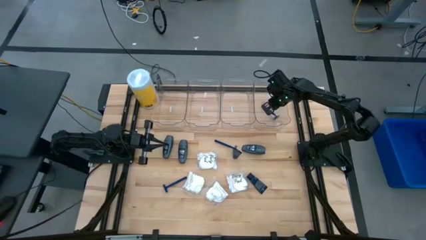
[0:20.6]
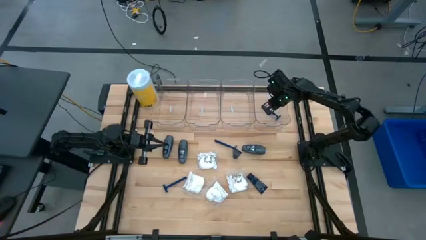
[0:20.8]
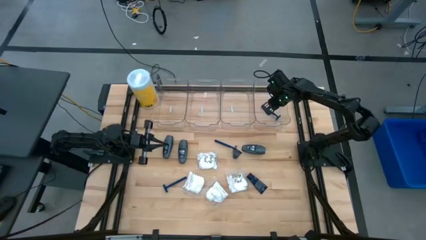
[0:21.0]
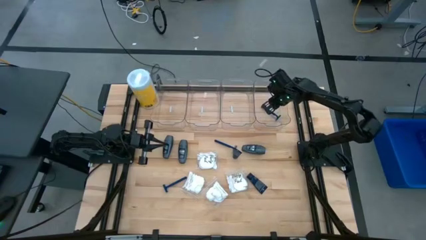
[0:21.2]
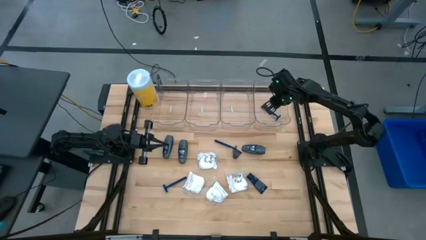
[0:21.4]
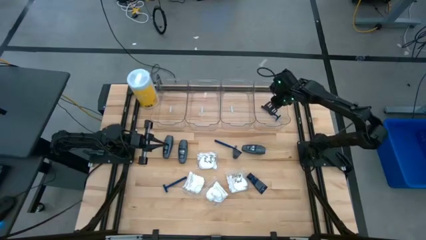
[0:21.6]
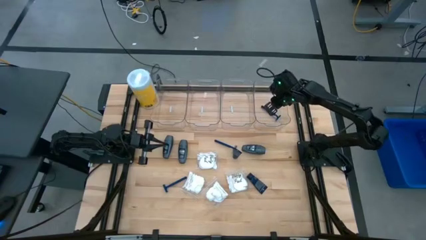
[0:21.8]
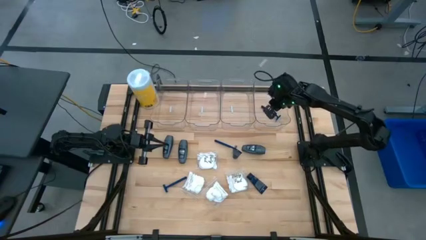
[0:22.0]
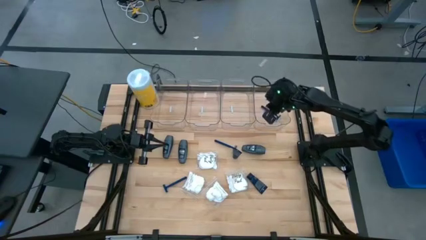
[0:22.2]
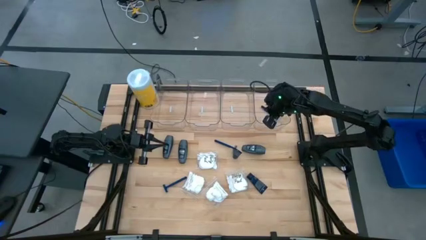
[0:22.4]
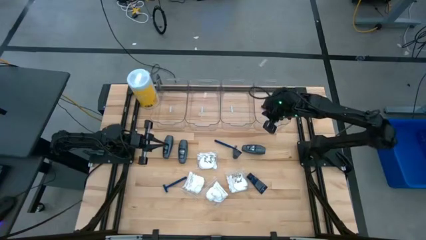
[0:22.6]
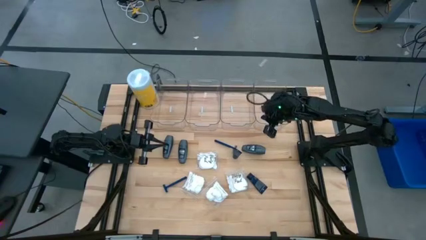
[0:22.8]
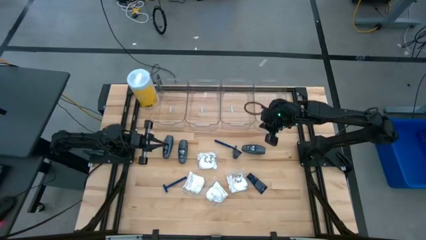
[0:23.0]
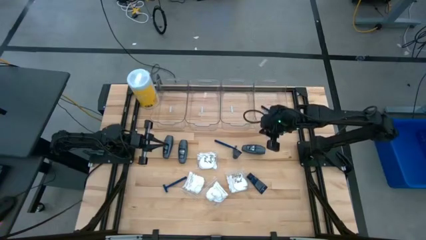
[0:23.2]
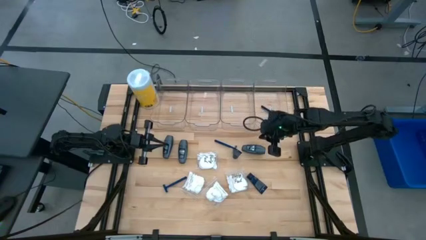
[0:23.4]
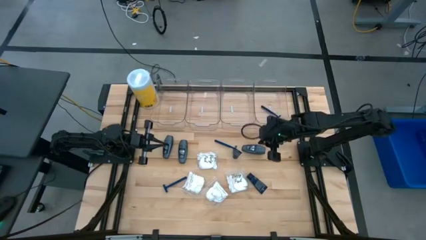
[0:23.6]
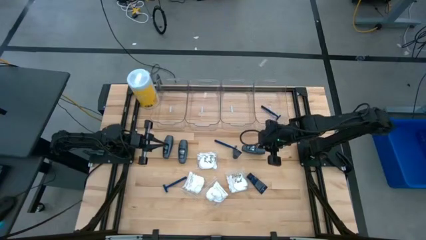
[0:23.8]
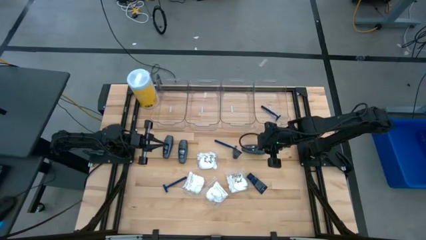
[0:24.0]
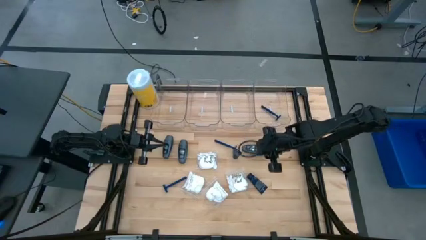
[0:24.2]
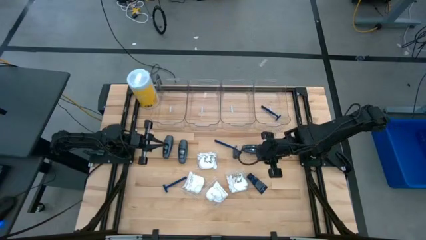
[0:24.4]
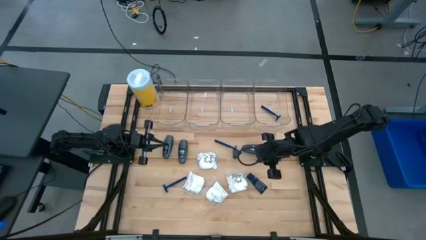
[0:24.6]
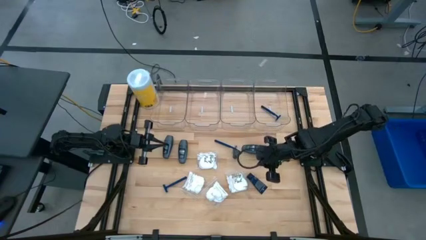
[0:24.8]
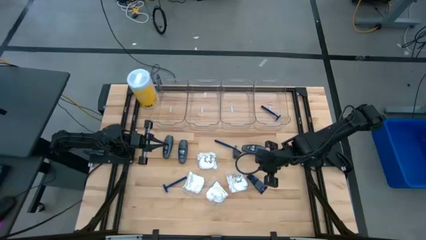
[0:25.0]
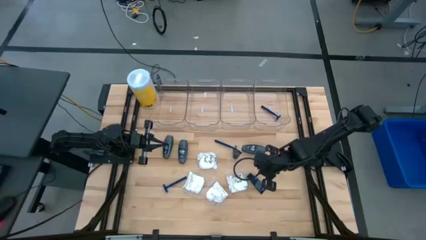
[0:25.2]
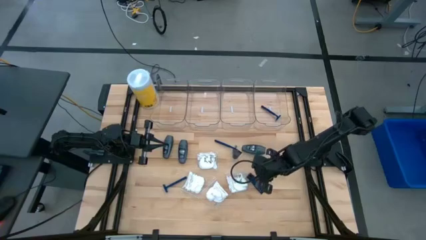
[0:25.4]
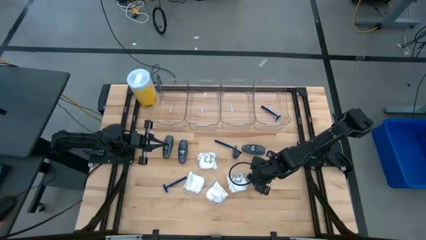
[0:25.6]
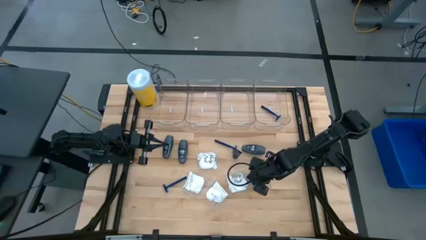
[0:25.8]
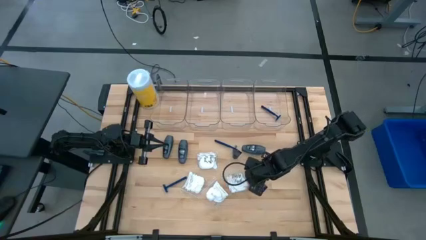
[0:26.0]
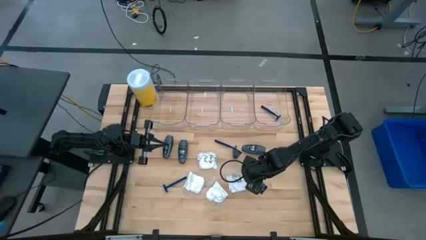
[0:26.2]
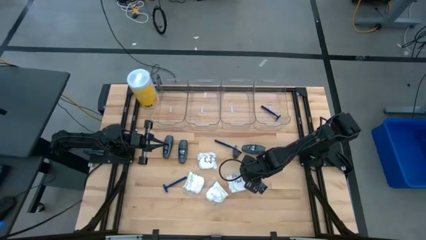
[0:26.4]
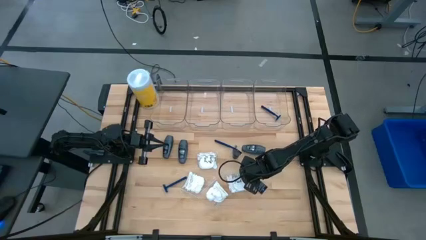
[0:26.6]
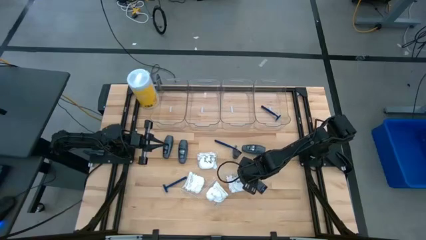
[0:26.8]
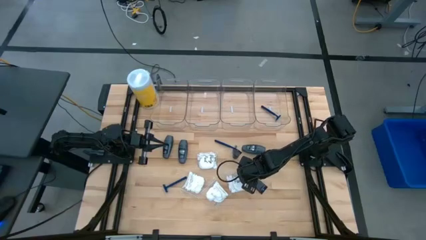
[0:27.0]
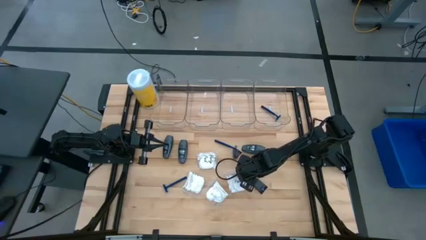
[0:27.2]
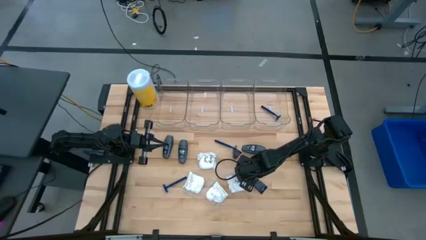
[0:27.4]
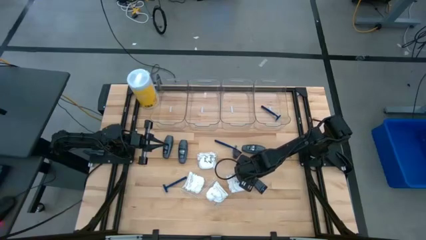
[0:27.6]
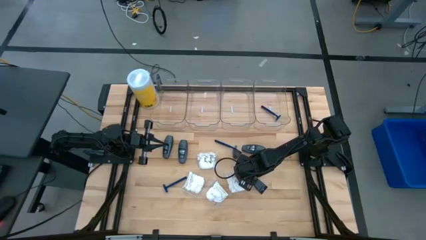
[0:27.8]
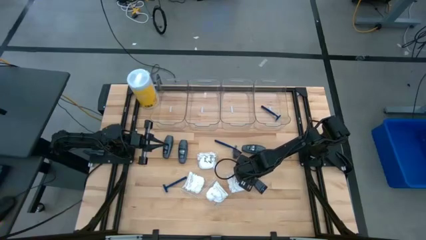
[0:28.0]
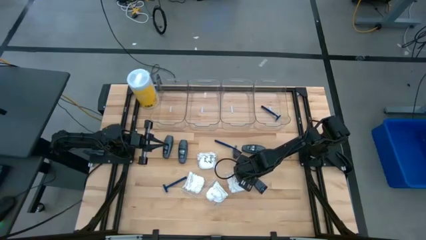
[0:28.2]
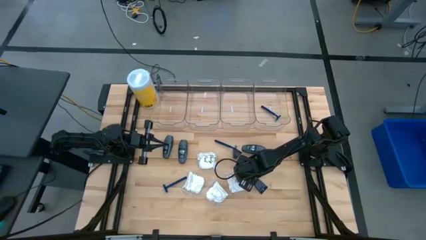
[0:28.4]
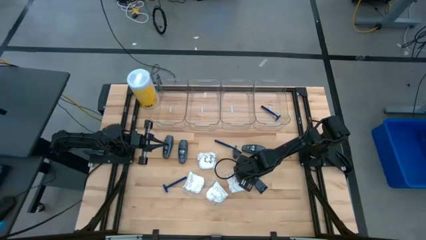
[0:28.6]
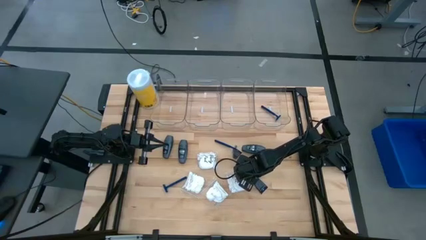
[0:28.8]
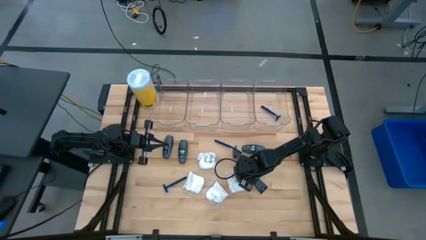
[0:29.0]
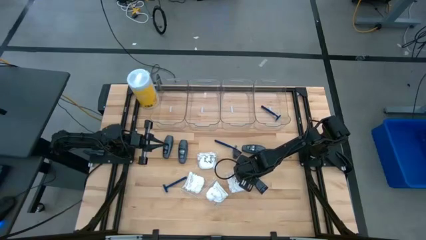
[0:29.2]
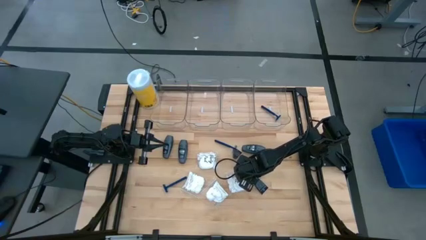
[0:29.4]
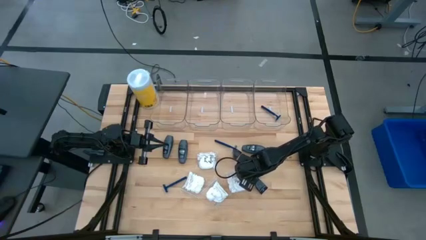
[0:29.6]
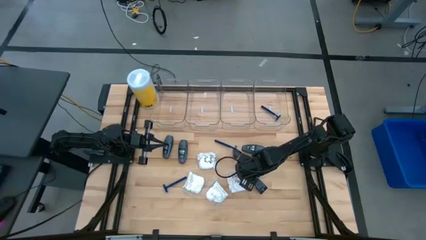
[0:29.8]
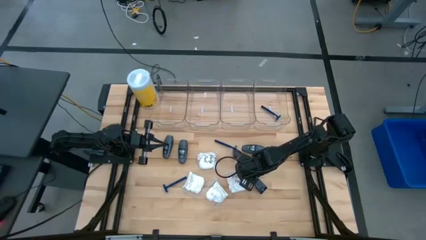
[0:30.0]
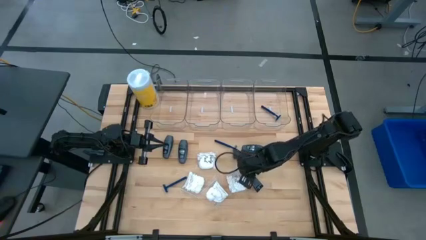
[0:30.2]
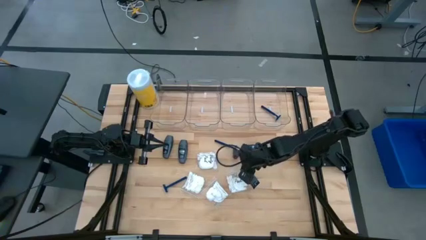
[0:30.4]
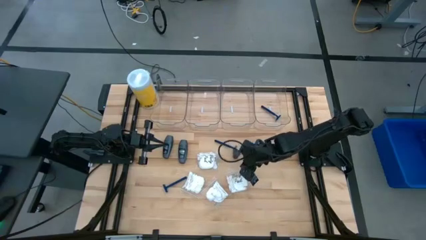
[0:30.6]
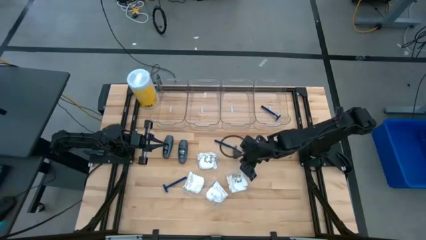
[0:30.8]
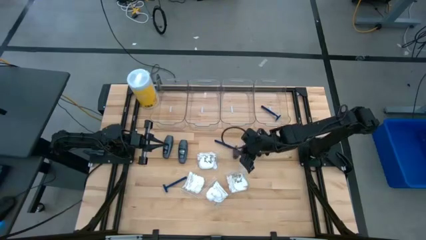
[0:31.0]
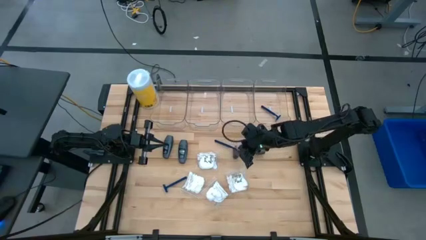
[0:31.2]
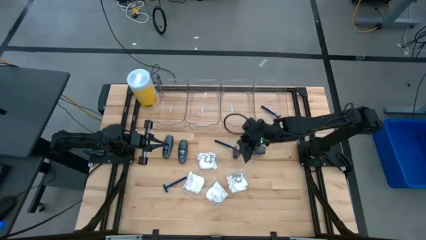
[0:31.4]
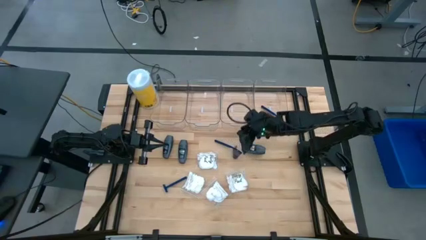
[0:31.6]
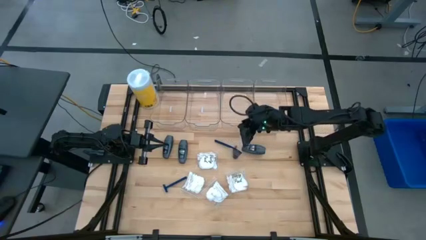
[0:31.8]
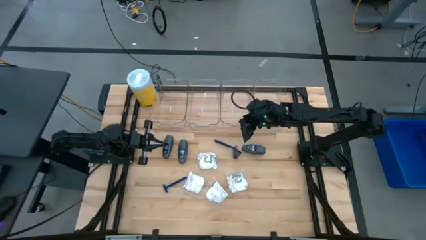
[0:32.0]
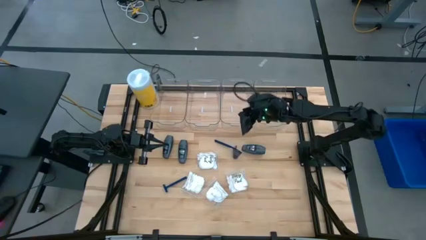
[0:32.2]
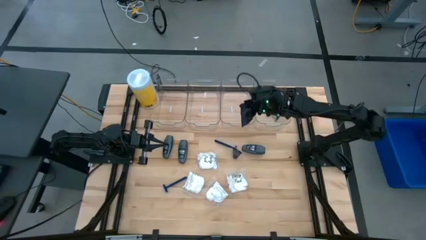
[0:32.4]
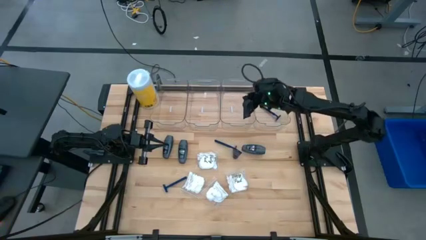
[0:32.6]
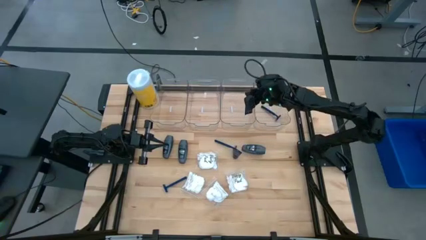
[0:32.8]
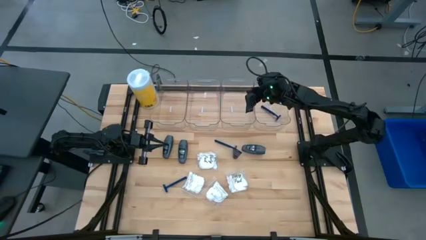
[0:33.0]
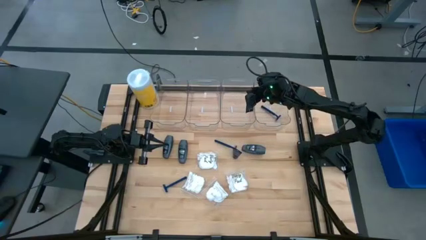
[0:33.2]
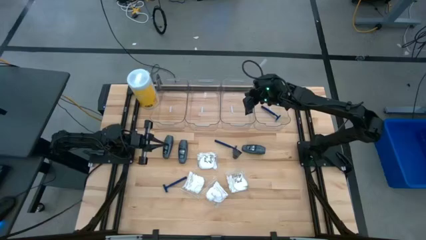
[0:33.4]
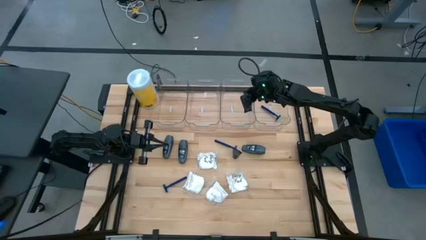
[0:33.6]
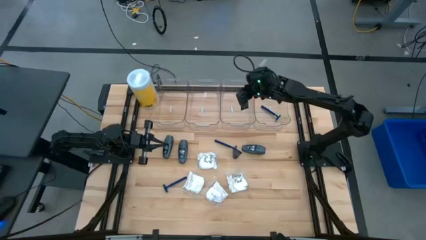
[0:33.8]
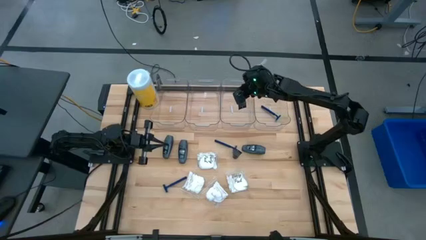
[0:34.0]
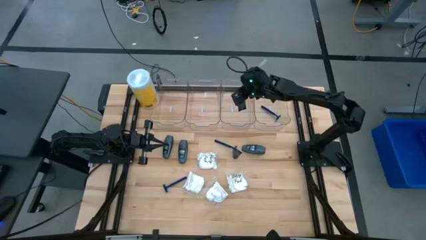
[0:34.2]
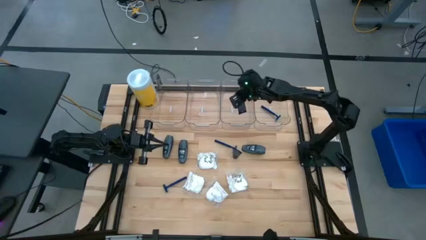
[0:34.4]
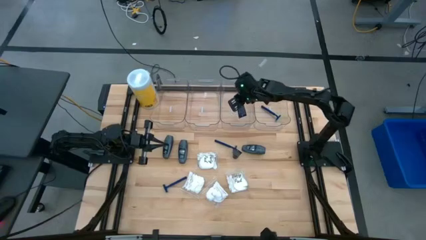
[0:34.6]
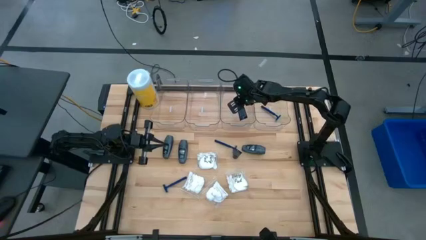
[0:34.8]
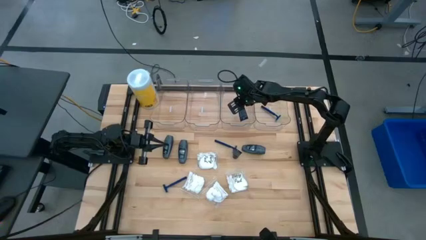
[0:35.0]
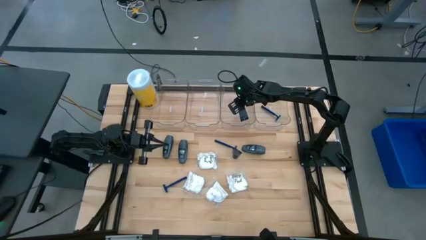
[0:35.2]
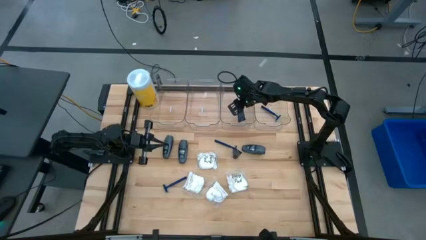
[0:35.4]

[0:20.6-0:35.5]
Task: Pick & Place Travel size toiletries
Put the dark blue shave cream into the middle right transparent bin
